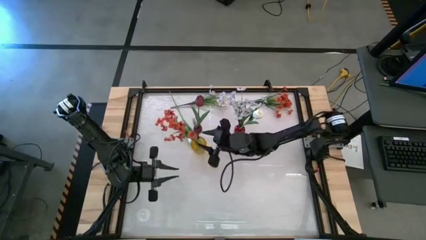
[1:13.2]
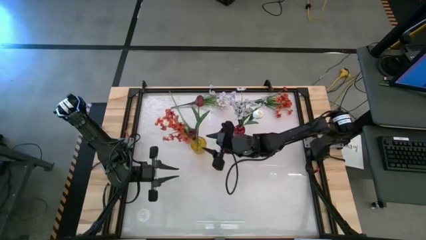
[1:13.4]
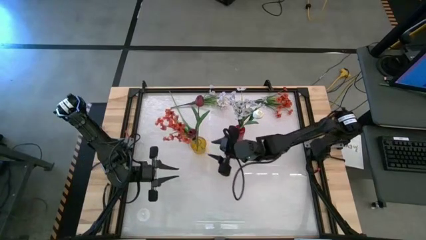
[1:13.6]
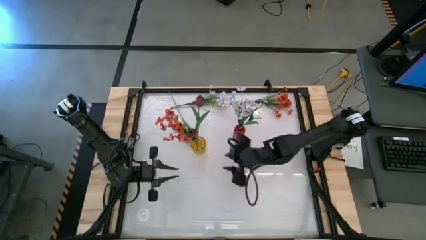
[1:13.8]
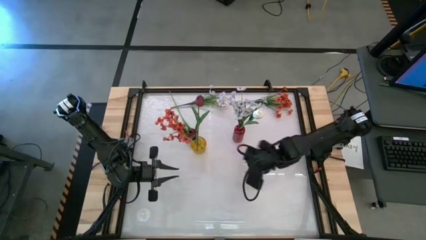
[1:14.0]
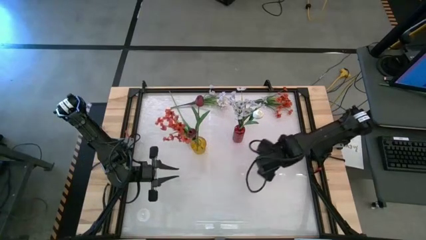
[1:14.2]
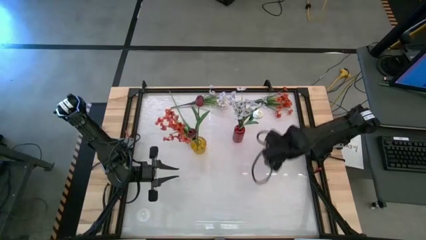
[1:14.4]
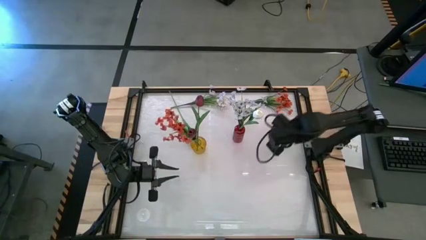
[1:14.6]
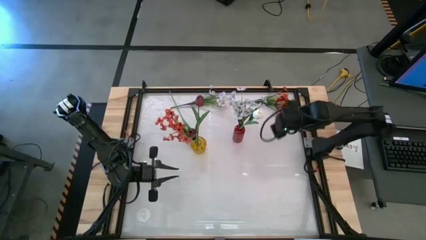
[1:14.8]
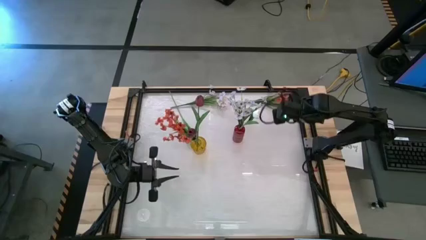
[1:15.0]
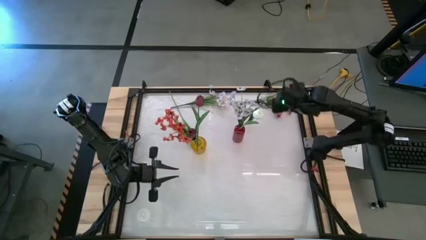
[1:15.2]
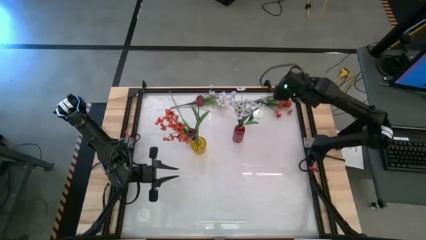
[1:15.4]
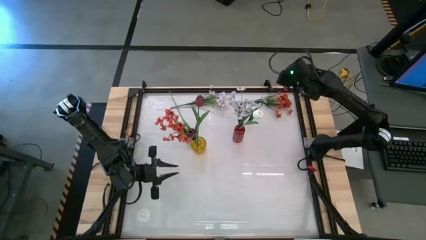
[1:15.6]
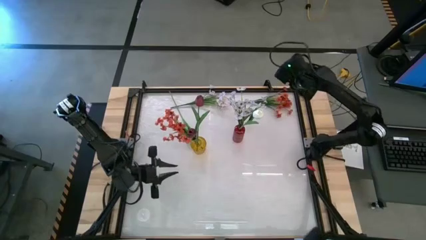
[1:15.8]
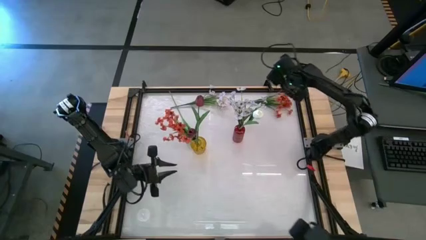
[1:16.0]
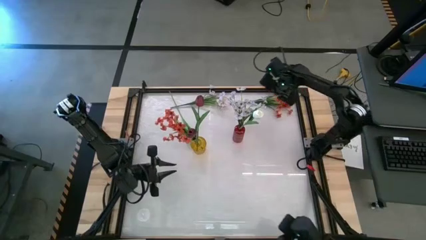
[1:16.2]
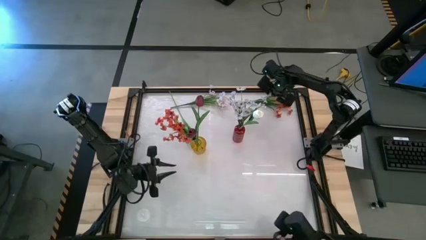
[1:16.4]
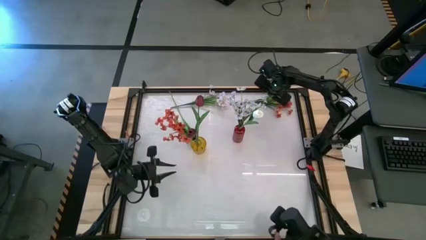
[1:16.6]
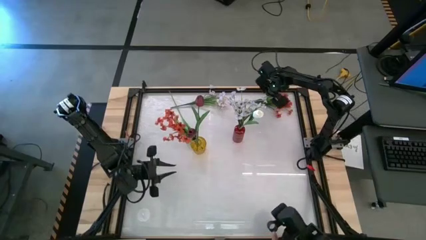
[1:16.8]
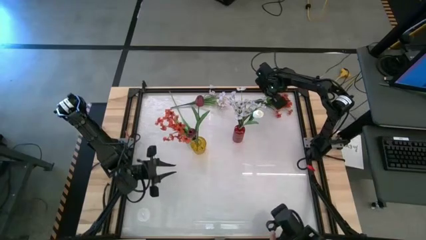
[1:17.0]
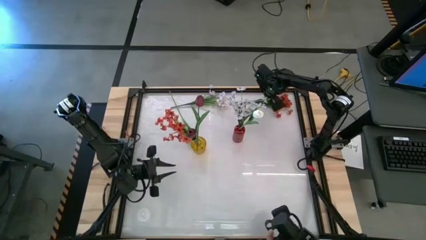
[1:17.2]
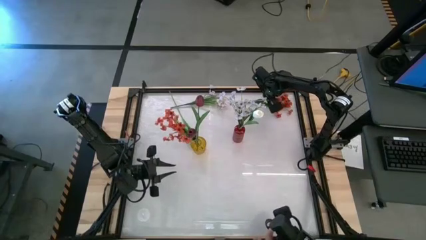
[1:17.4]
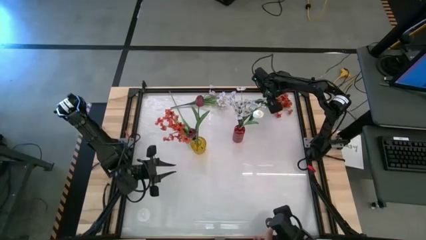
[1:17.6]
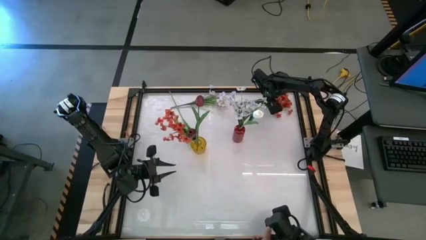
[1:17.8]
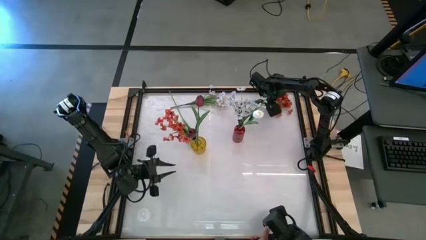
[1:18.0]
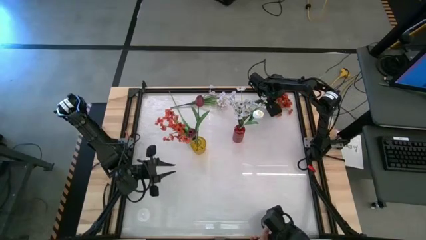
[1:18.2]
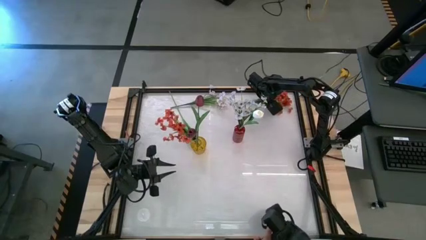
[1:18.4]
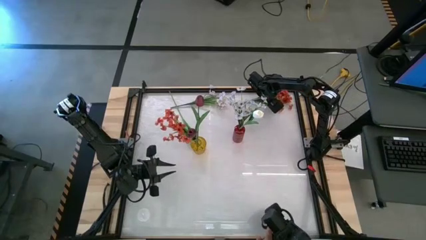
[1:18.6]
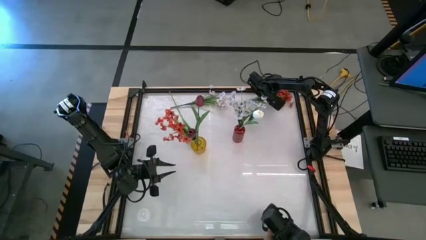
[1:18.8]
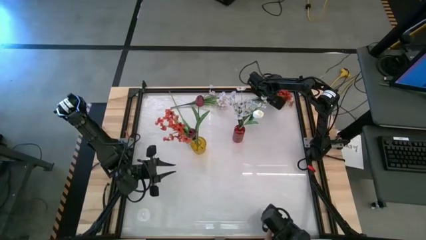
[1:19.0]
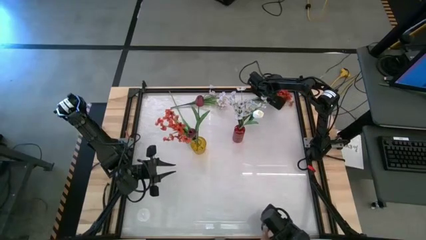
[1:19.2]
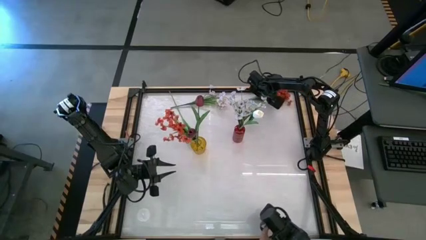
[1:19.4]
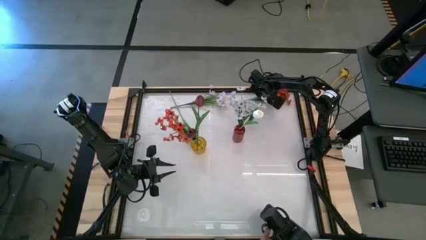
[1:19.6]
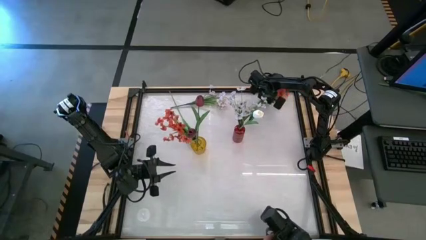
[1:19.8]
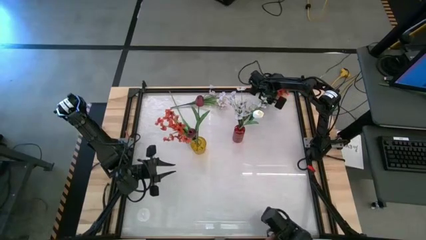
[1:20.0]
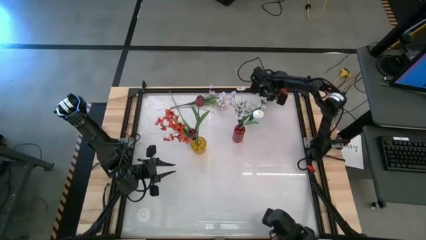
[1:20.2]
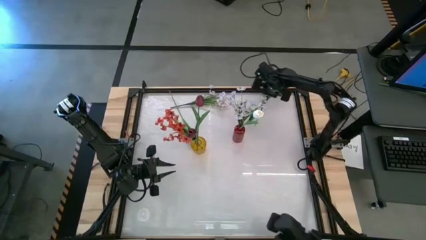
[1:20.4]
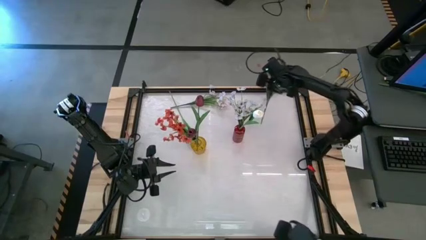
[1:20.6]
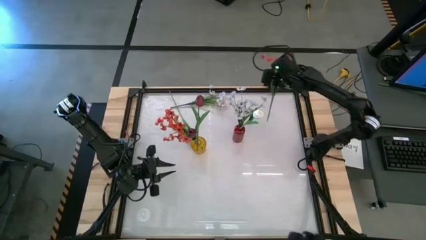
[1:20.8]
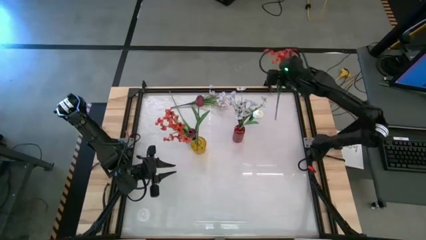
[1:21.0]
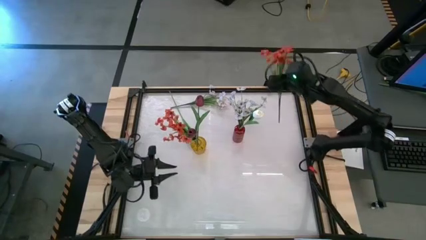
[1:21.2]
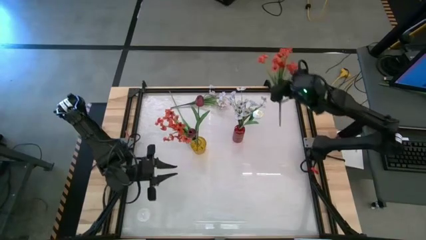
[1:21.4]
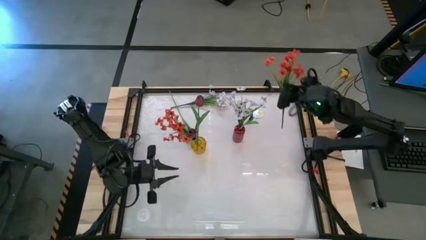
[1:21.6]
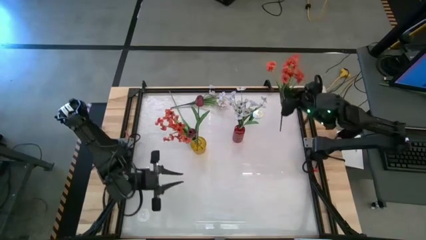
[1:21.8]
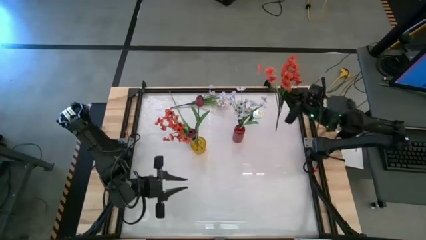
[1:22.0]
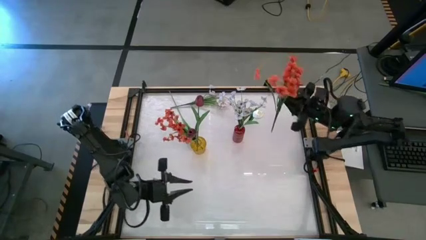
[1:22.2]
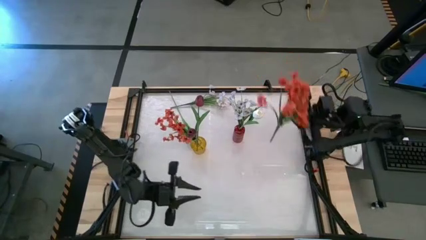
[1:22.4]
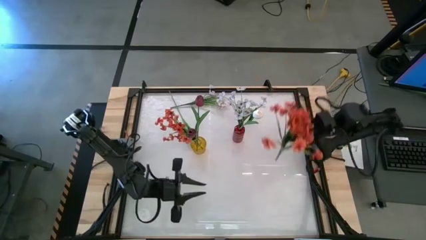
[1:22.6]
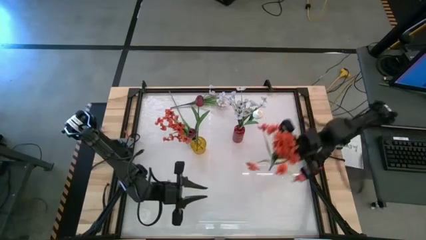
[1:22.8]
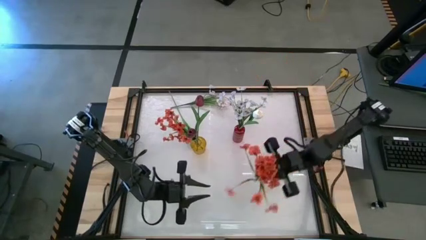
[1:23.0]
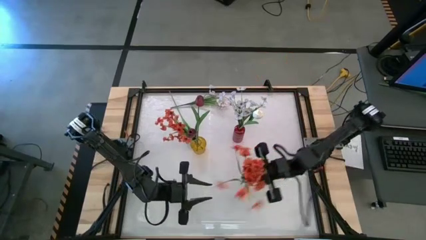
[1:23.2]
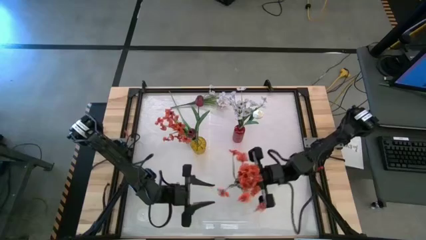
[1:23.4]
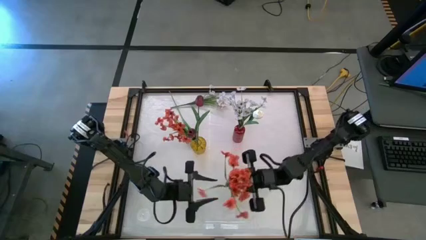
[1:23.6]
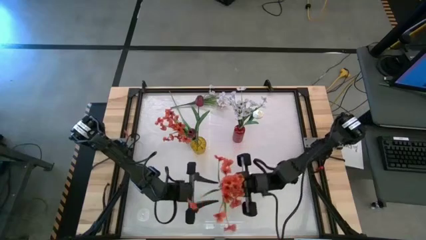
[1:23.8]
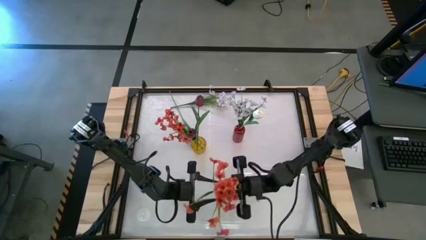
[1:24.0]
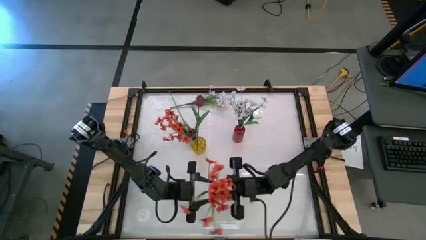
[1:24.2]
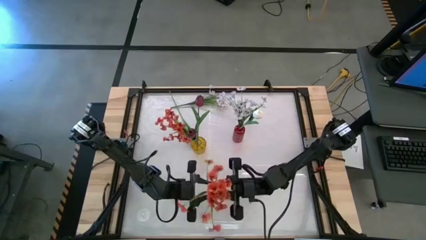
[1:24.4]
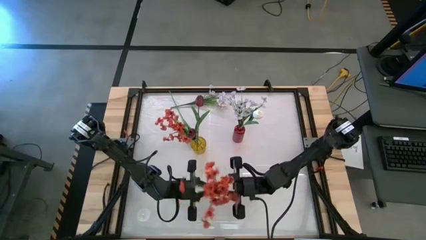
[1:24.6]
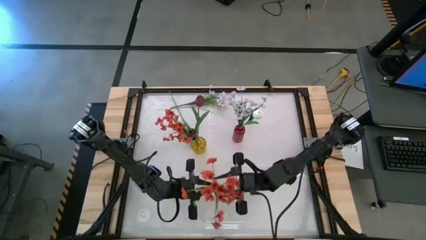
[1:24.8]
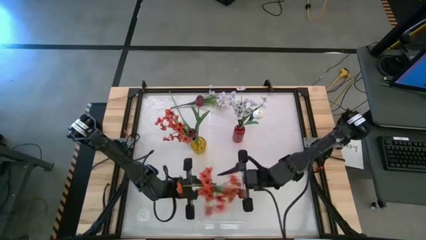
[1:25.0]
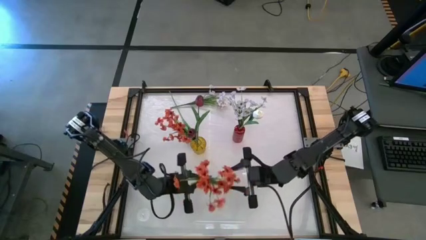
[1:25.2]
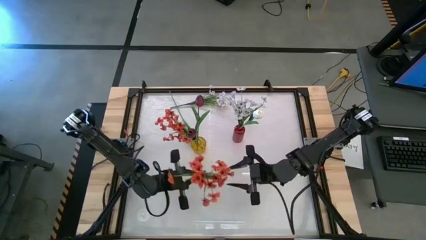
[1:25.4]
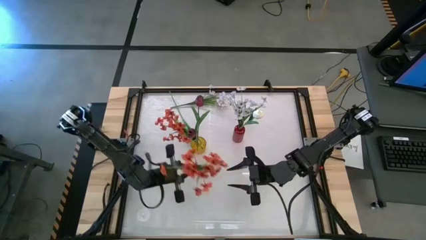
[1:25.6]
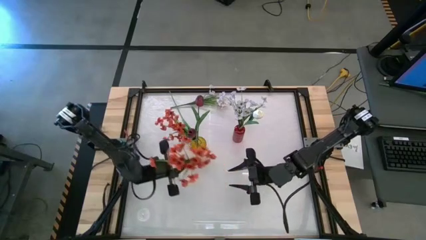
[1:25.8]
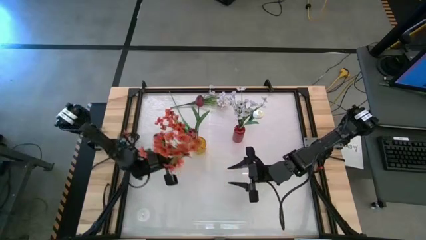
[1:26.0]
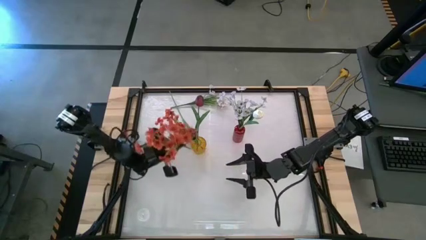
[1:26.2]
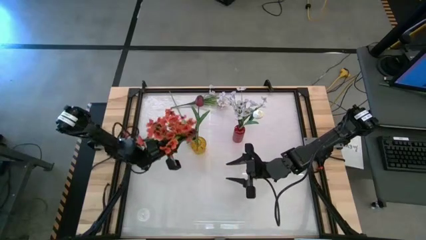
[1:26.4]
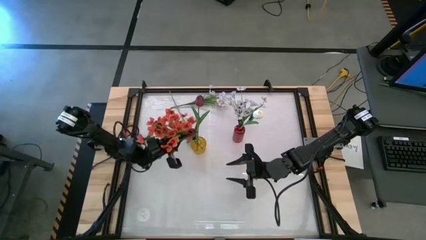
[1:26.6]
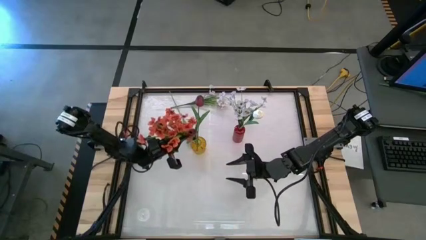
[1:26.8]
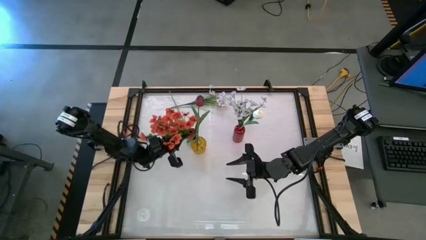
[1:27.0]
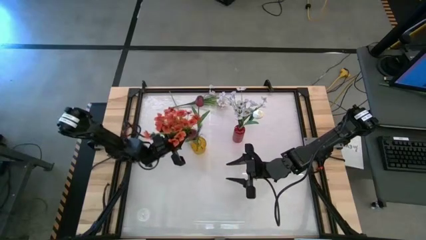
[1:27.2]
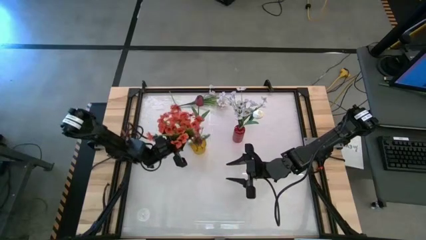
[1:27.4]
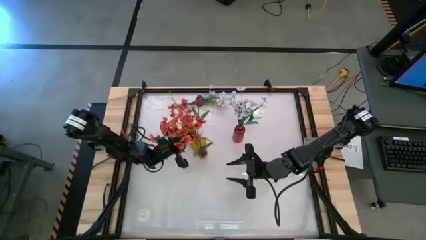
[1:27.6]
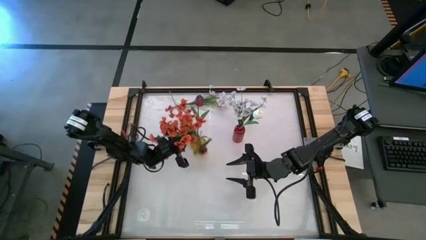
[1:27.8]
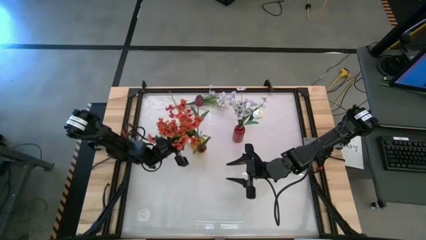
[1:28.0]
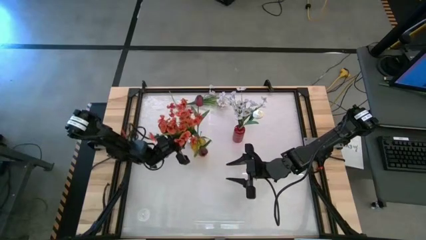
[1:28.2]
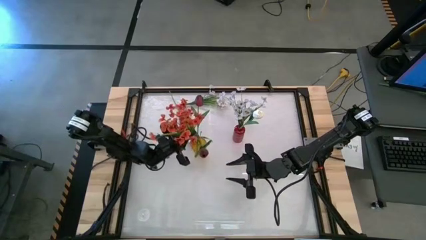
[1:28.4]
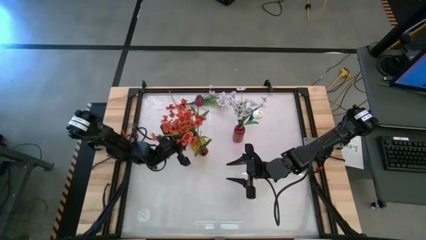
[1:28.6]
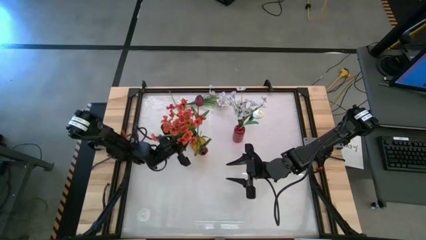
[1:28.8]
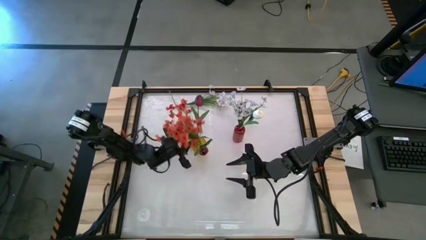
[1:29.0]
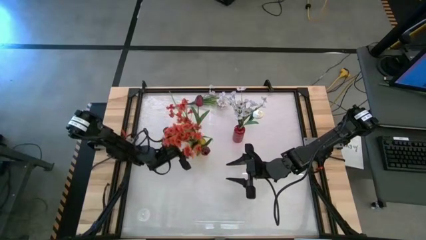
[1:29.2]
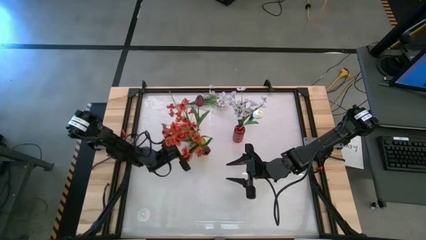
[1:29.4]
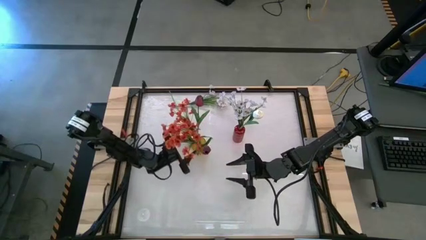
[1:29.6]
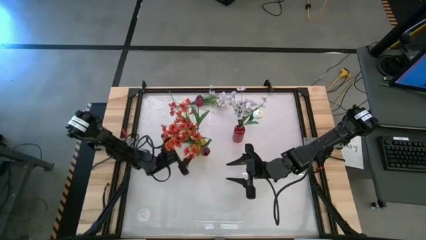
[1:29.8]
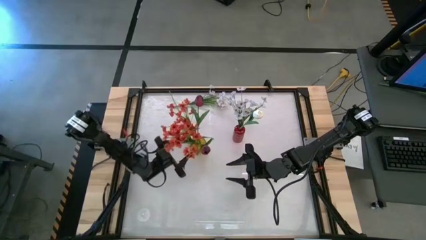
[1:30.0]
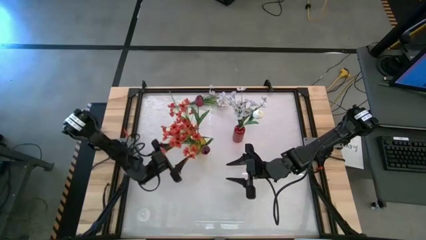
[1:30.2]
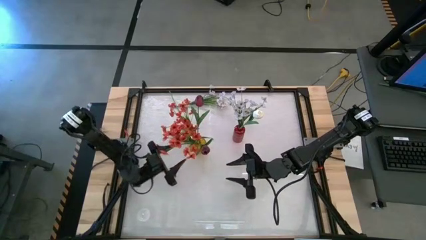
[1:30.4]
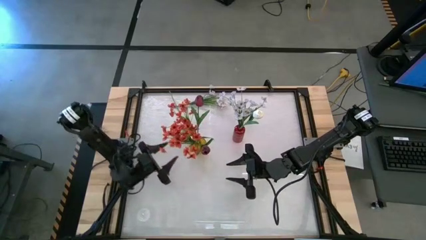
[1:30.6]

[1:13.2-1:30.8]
Task: Sort flowers into vase by color
Put the orange flowers into the yellow flower vase
